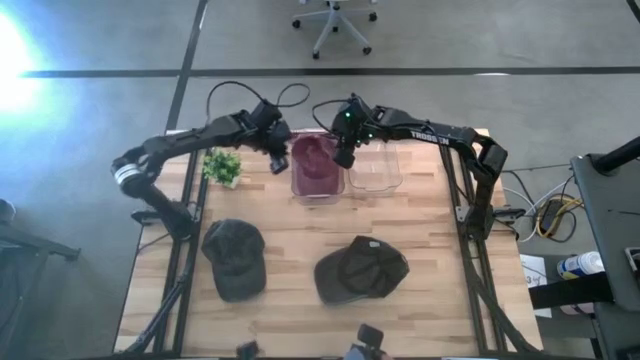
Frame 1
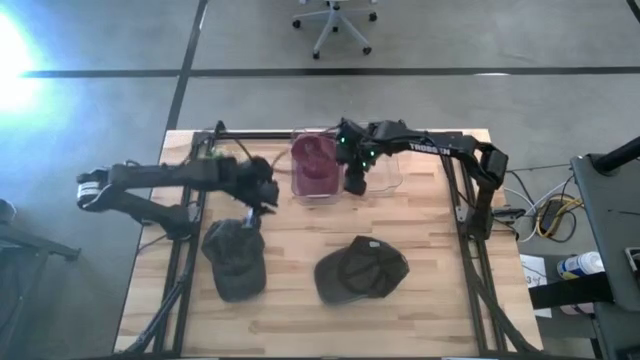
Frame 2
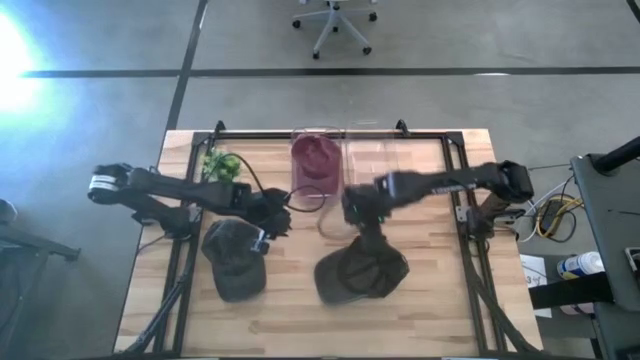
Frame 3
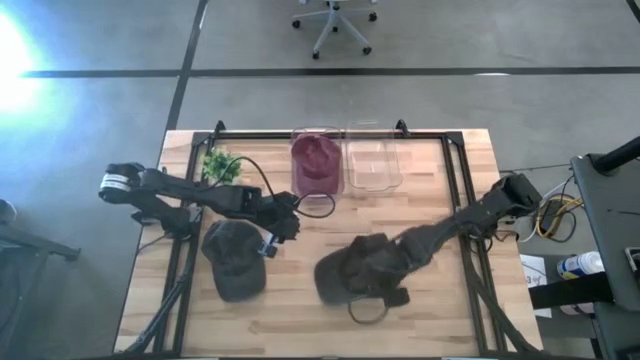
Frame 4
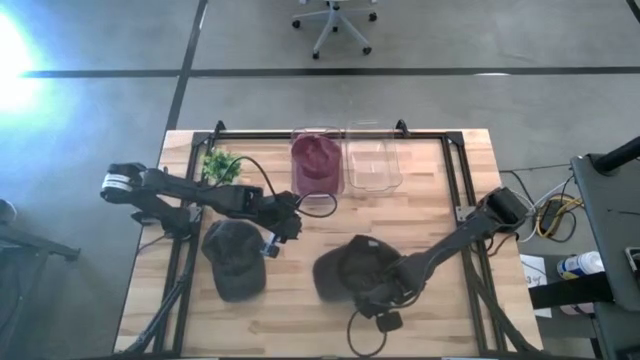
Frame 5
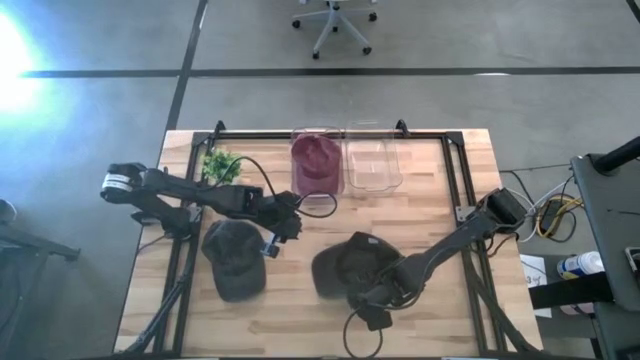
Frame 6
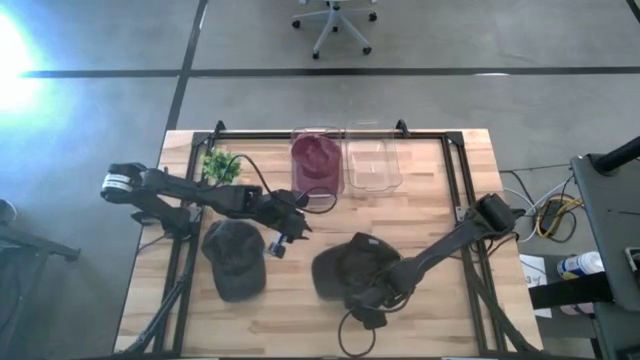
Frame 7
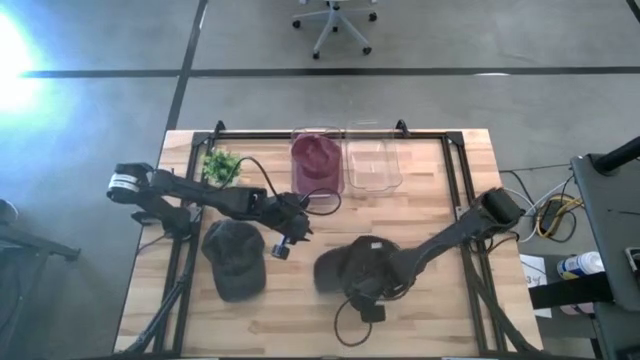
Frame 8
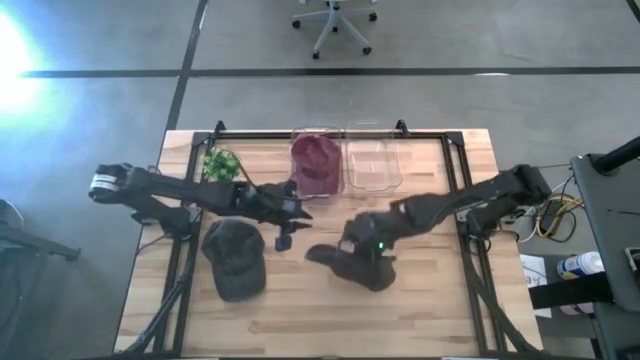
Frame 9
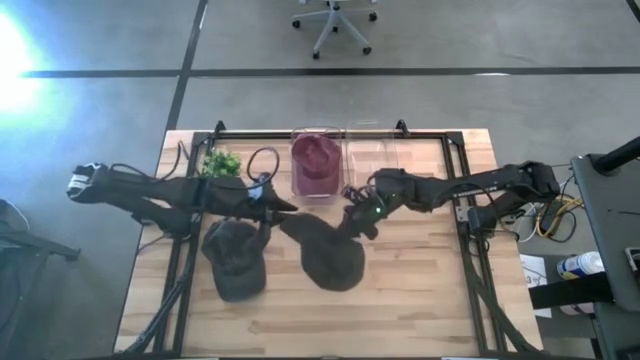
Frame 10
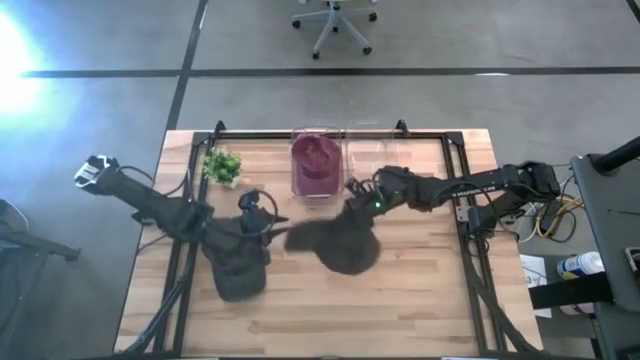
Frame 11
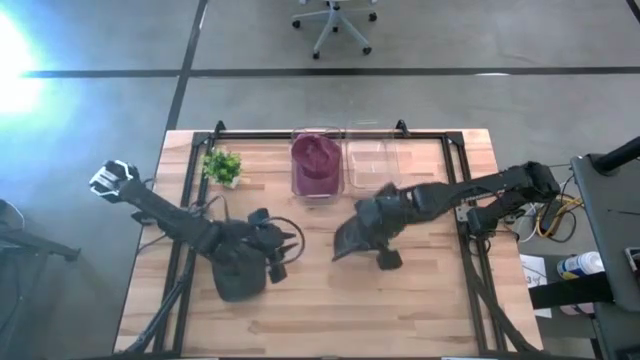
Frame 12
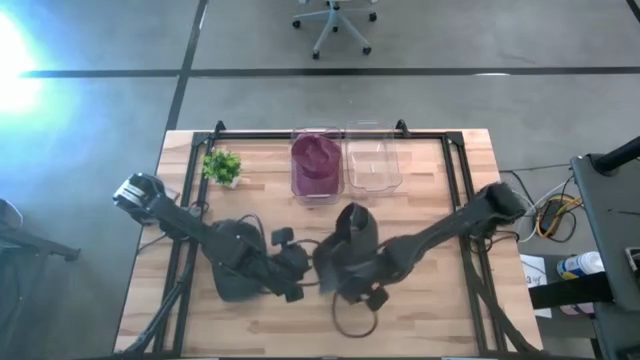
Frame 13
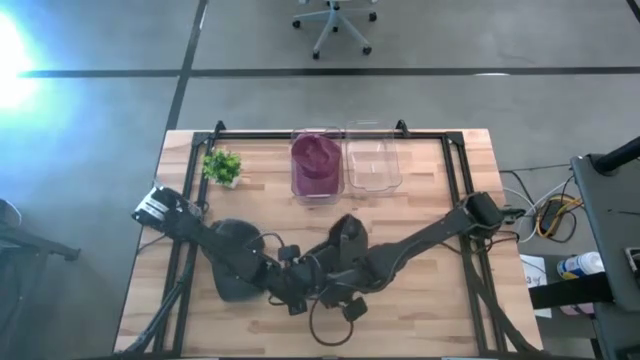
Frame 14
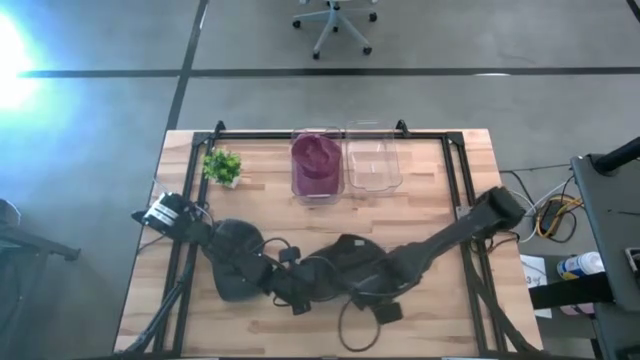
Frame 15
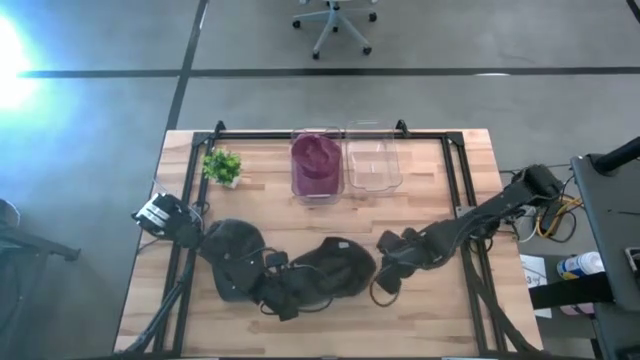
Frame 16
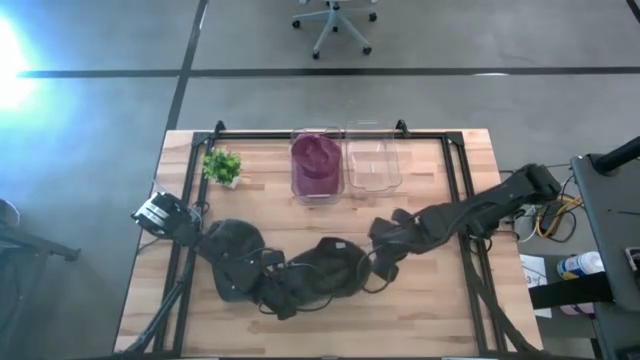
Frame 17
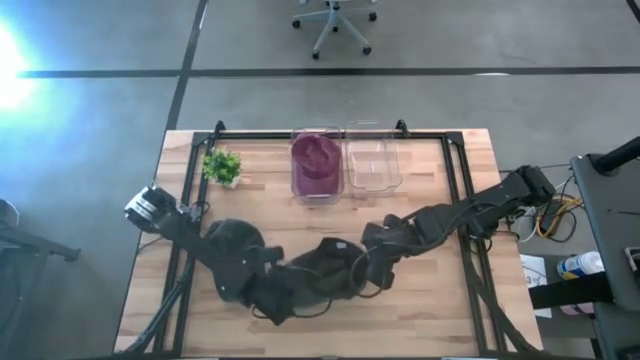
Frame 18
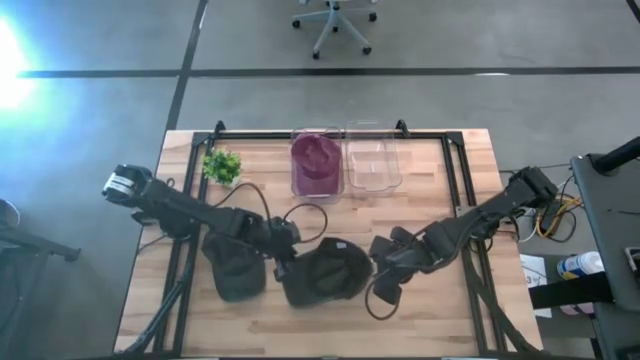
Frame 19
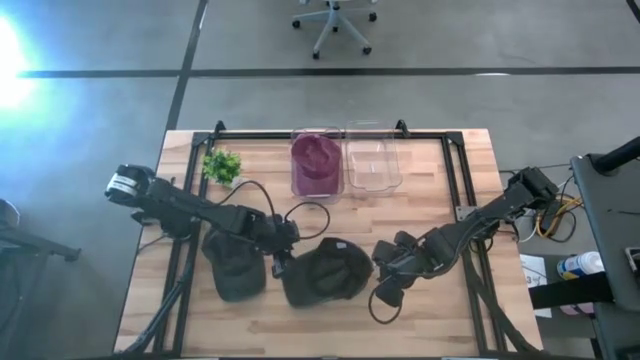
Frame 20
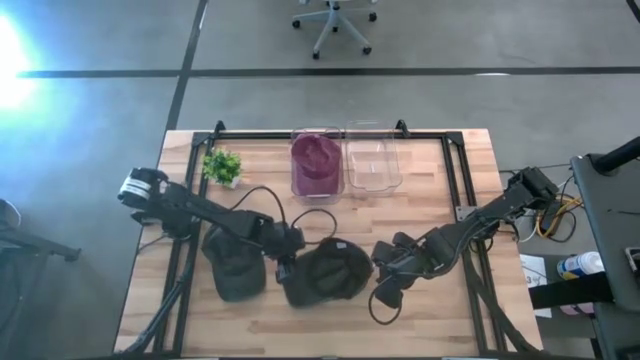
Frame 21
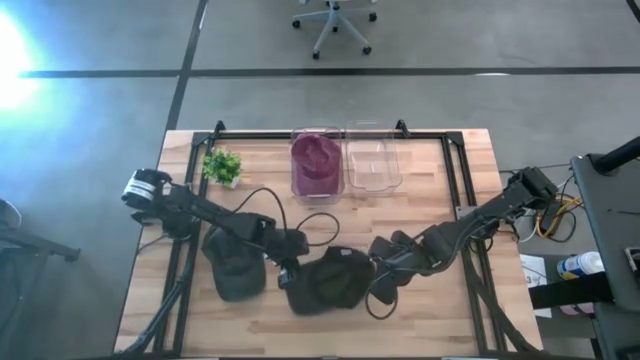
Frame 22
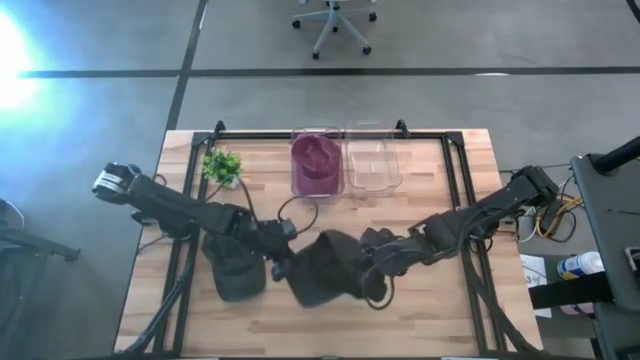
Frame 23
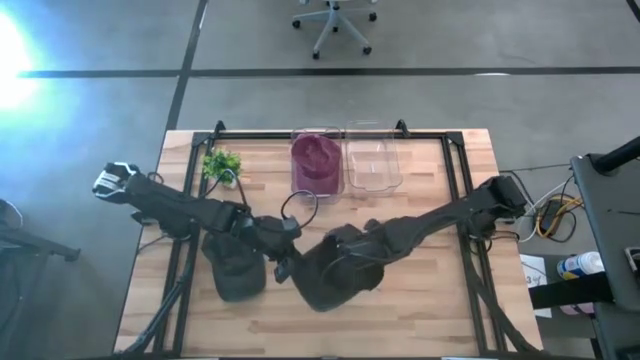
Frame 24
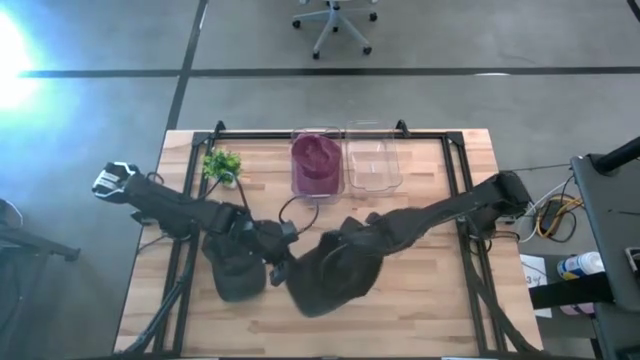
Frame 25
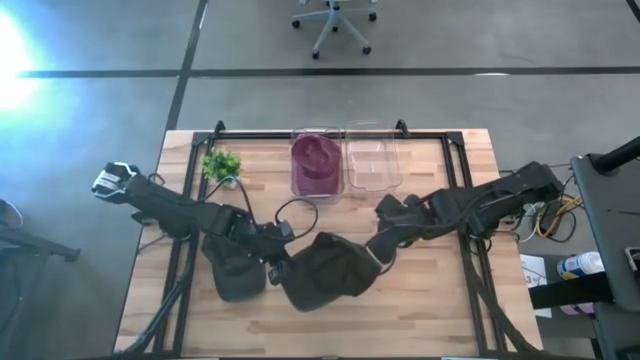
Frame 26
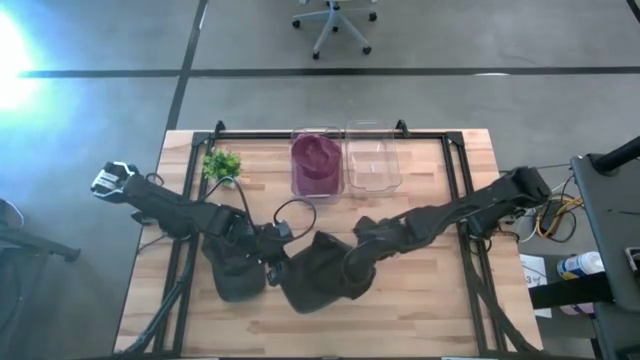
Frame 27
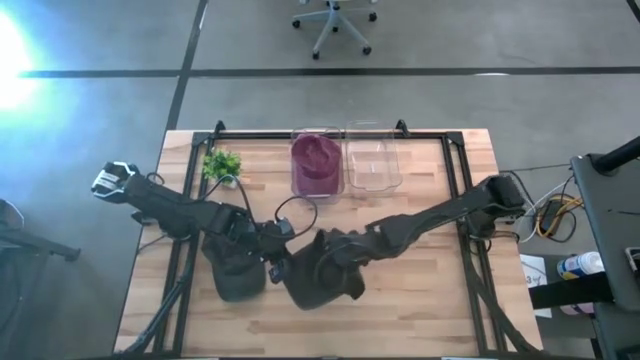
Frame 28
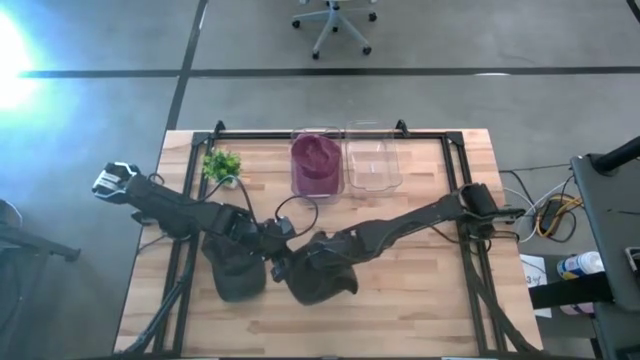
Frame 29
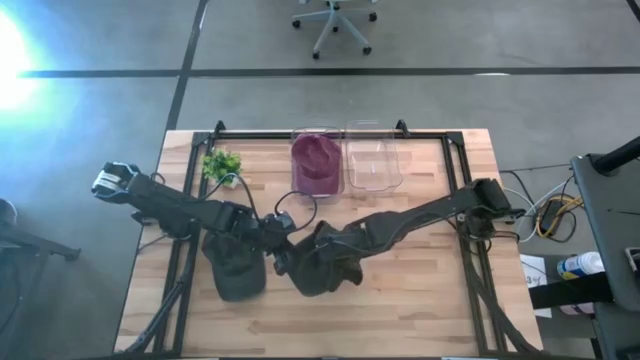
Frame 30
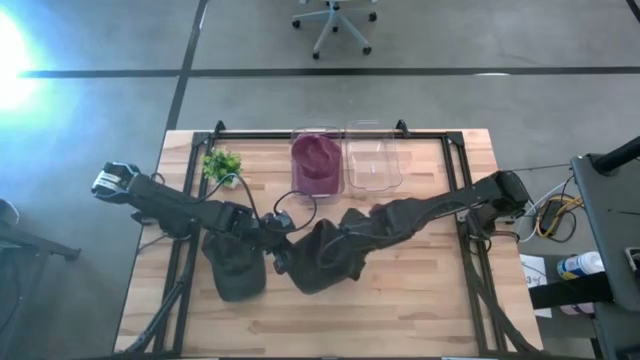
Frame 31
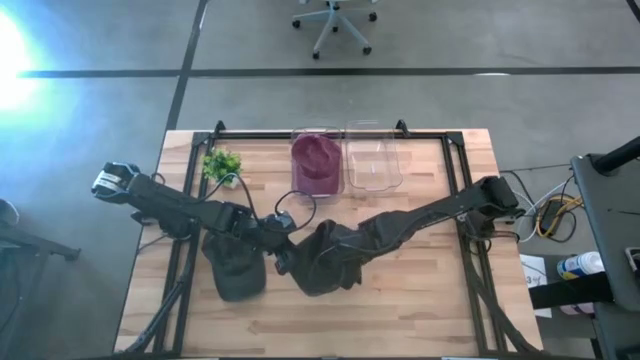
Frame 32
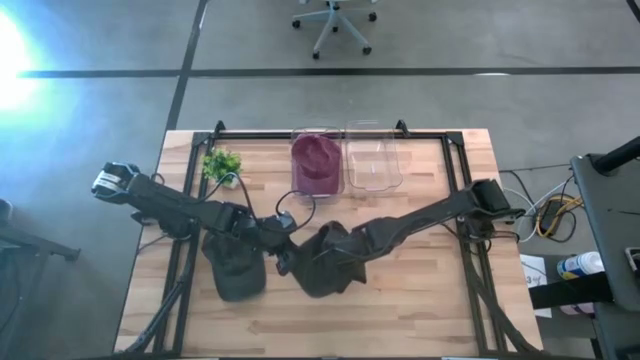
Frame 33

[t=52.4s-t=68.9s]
Task: Pick & Place hat
Put the right black cap into the right transparent bin

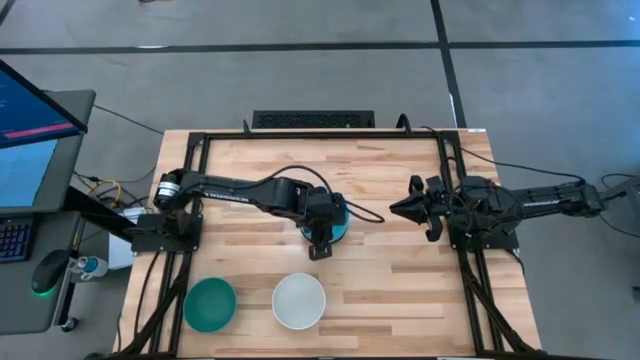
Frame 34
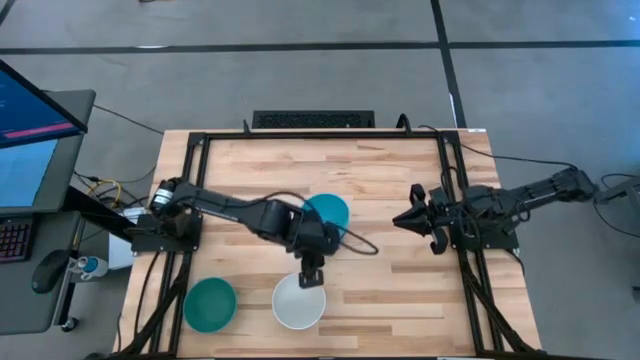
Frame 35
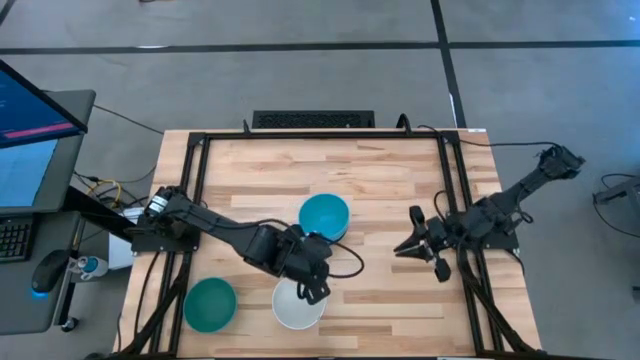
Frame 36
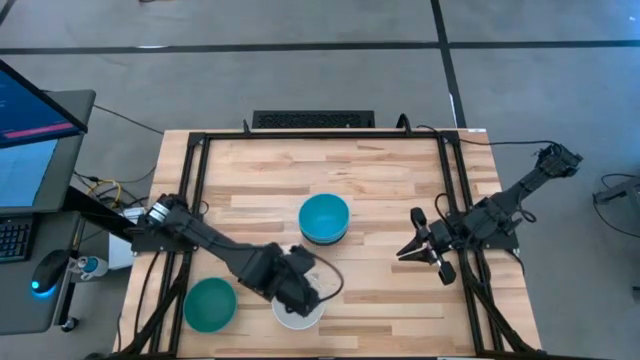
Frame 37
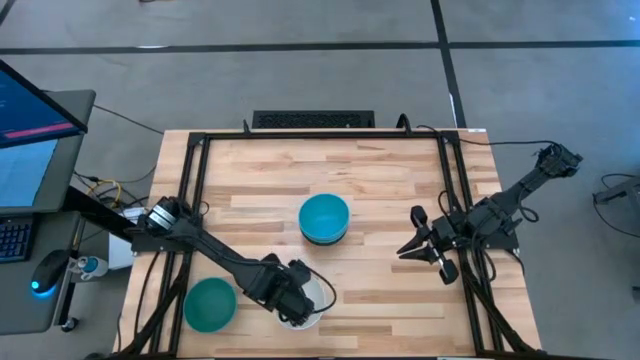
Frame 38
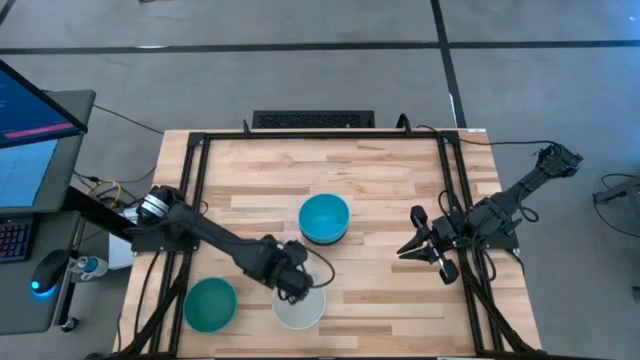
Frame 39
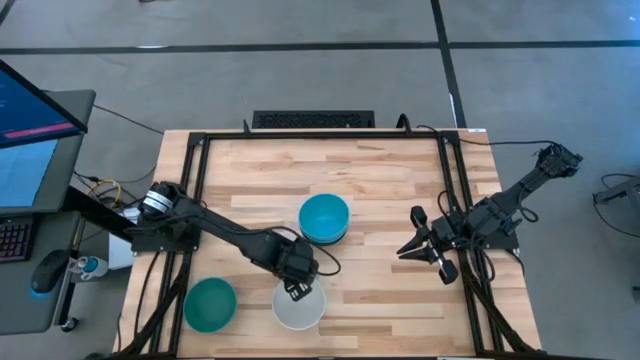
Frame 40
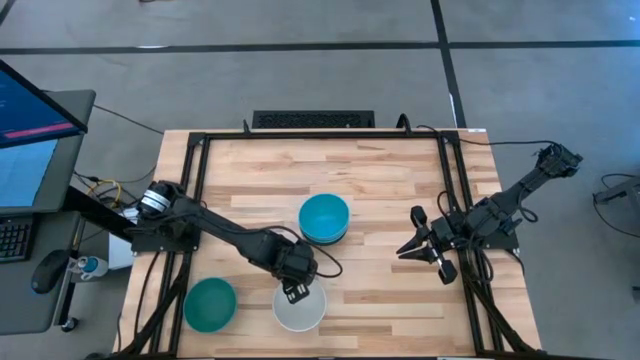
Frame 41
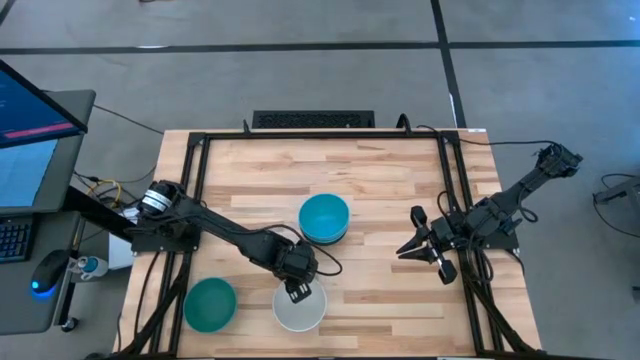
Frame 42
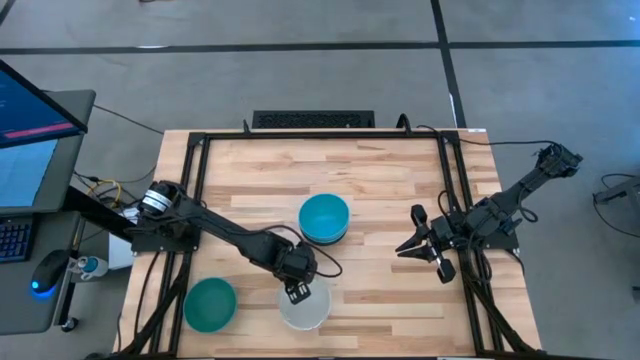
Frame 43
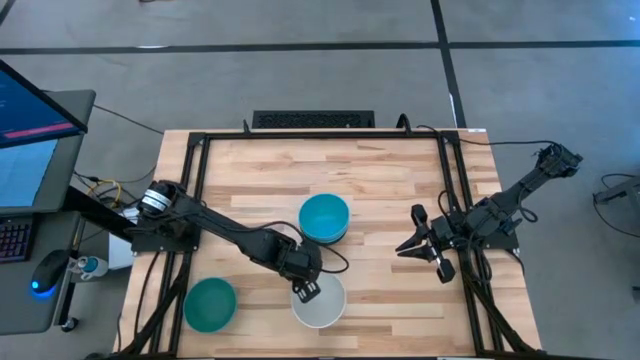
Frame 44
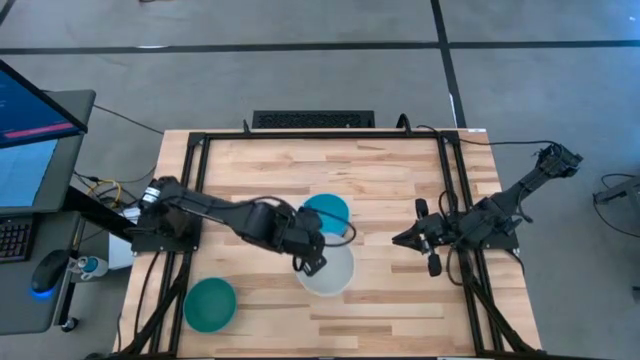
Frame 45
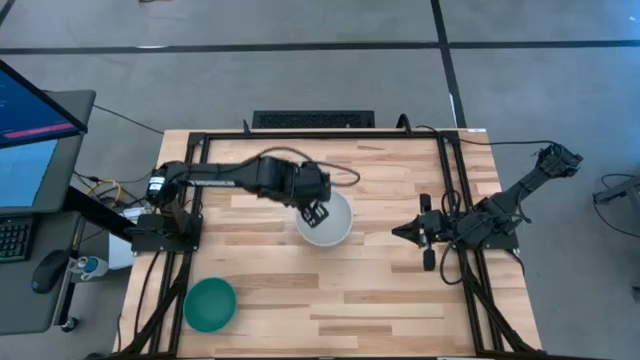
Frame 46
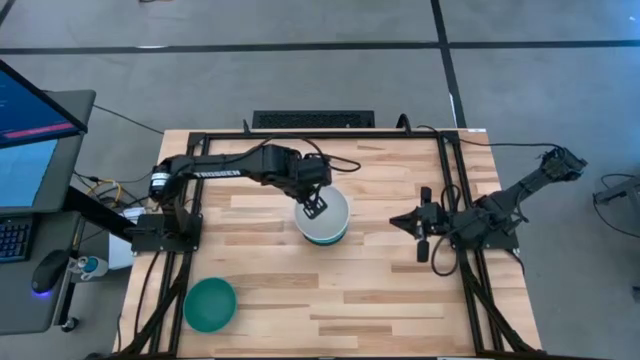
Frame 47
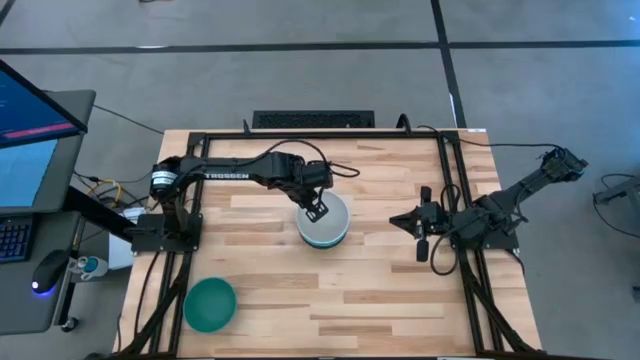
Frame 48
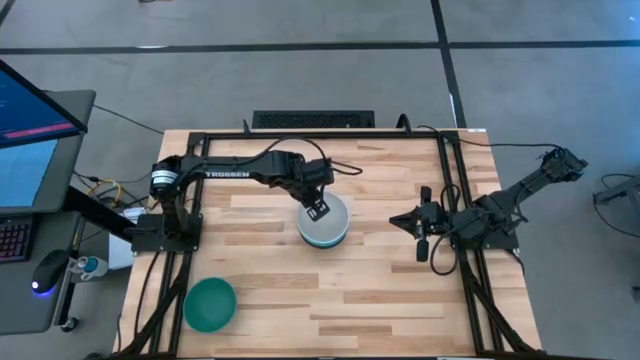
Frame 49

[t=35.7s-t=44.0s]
Task: Nest bowls inside each other
Stack the white bowl on top of the blue bowl
